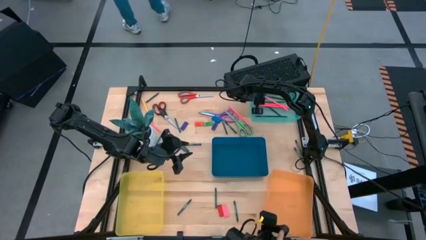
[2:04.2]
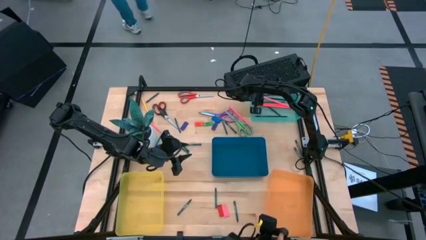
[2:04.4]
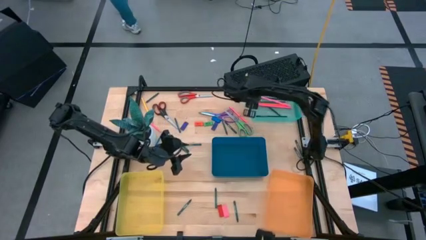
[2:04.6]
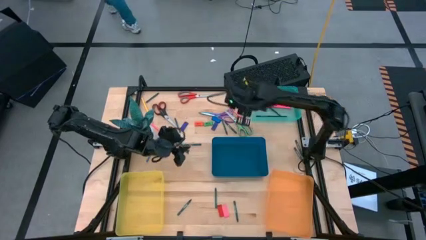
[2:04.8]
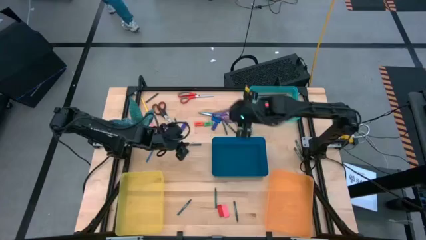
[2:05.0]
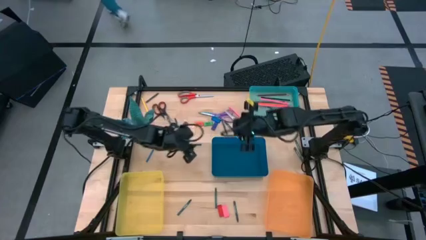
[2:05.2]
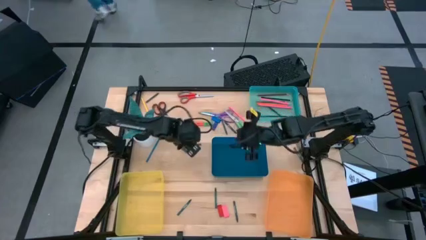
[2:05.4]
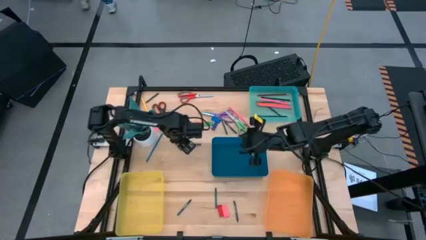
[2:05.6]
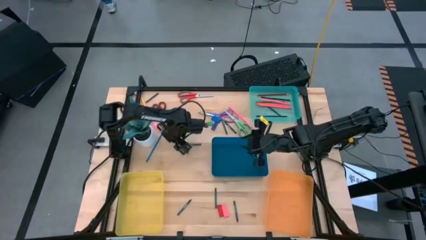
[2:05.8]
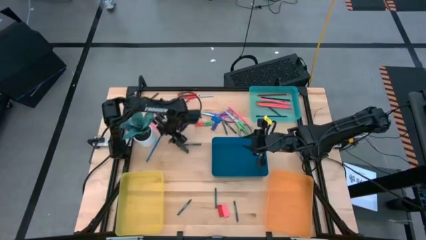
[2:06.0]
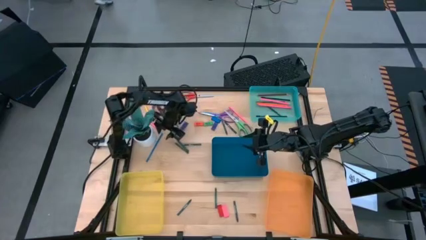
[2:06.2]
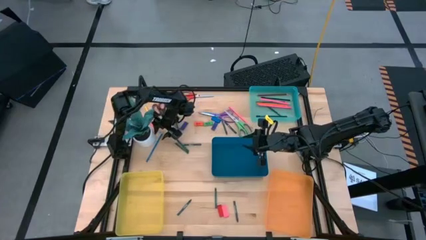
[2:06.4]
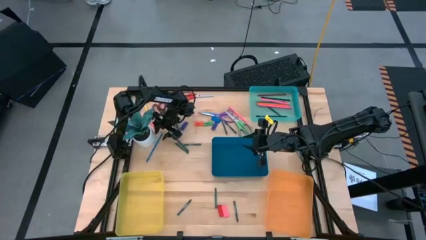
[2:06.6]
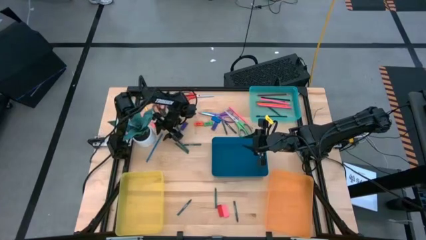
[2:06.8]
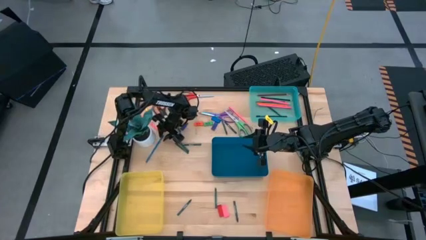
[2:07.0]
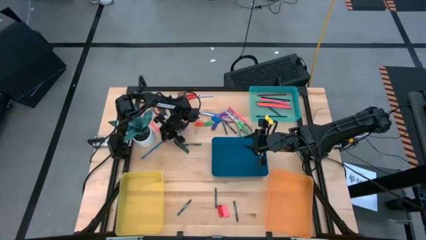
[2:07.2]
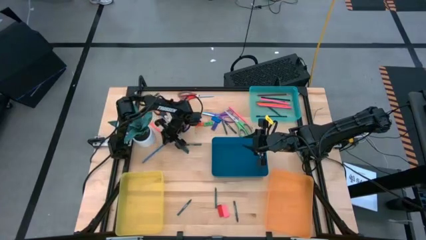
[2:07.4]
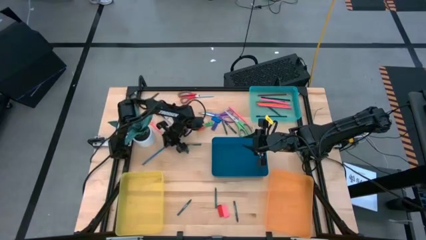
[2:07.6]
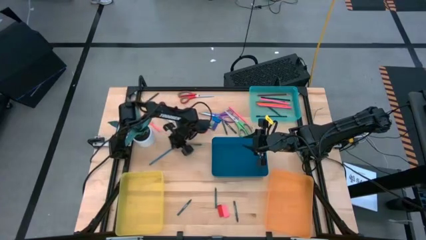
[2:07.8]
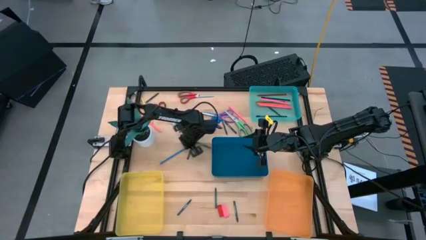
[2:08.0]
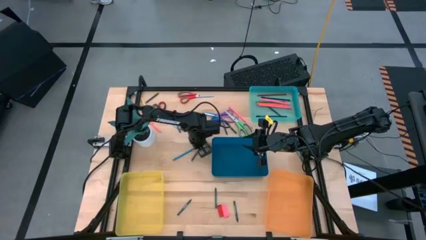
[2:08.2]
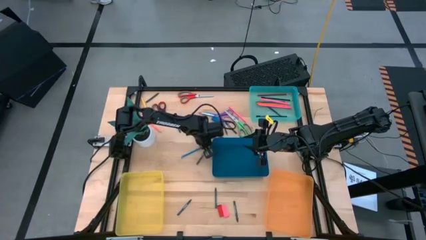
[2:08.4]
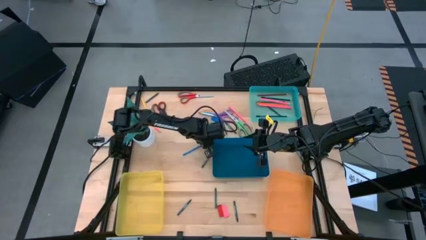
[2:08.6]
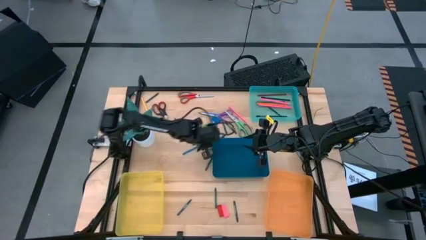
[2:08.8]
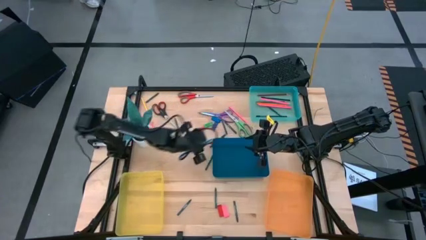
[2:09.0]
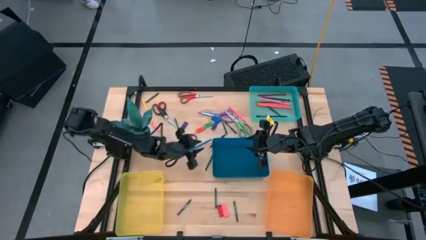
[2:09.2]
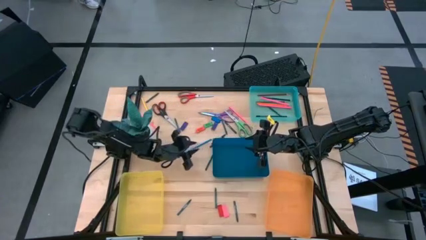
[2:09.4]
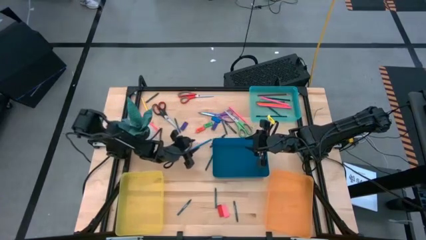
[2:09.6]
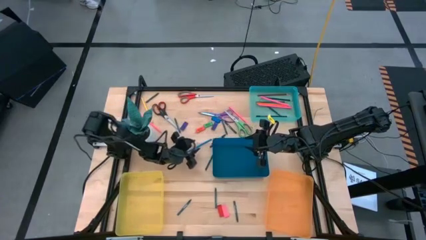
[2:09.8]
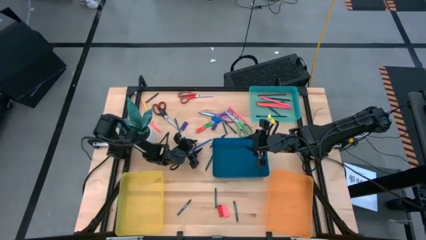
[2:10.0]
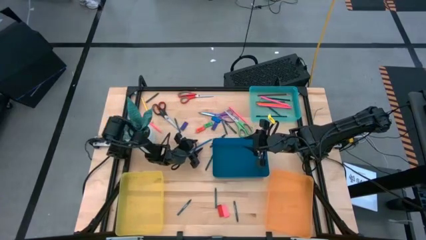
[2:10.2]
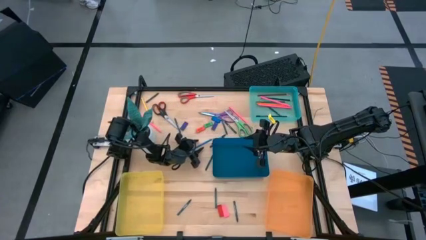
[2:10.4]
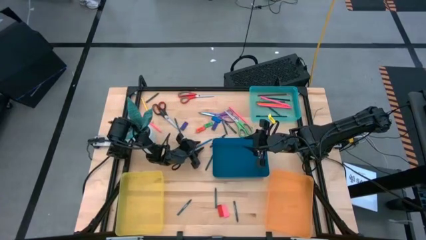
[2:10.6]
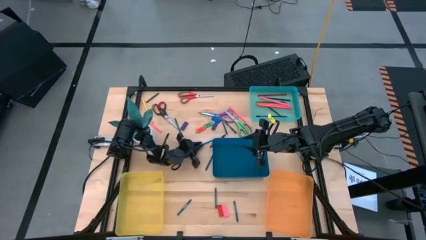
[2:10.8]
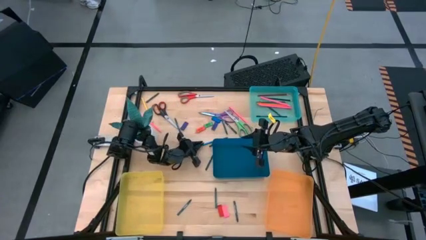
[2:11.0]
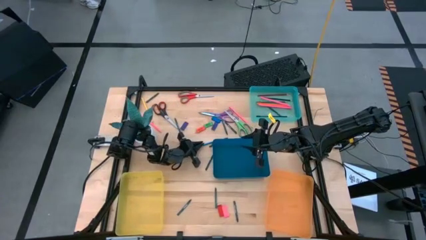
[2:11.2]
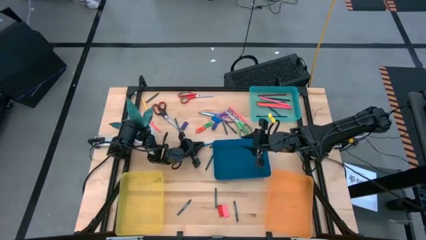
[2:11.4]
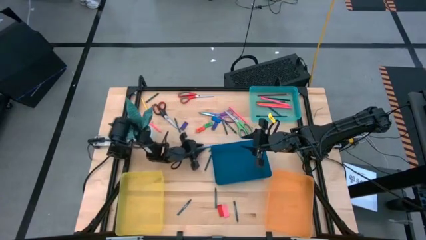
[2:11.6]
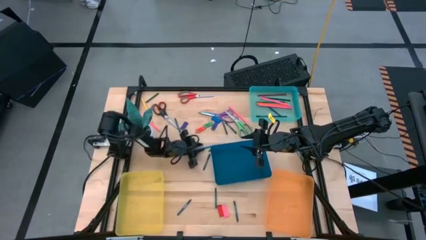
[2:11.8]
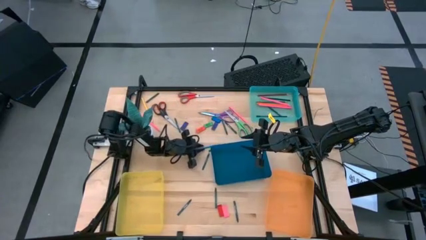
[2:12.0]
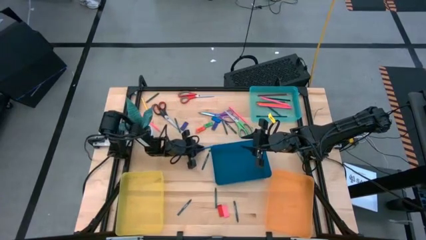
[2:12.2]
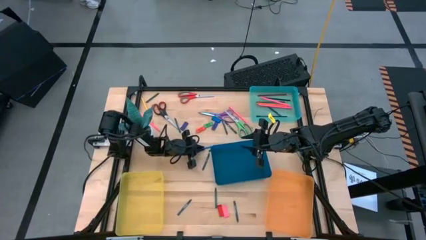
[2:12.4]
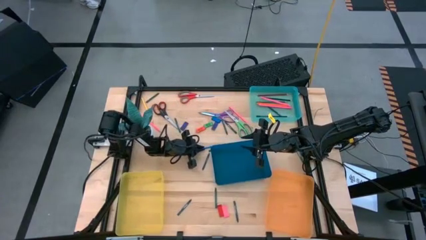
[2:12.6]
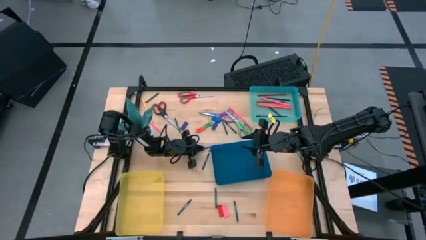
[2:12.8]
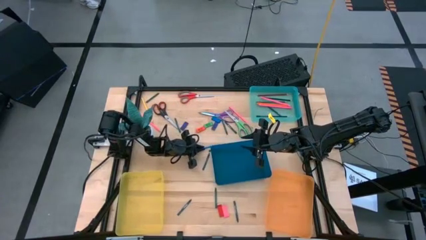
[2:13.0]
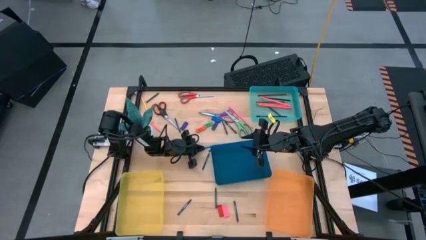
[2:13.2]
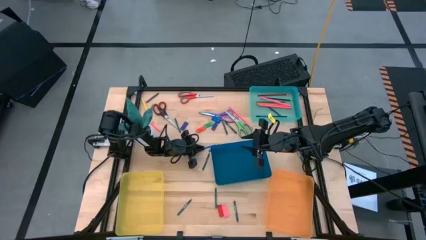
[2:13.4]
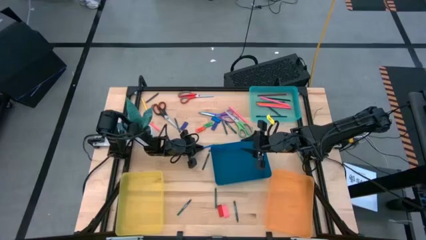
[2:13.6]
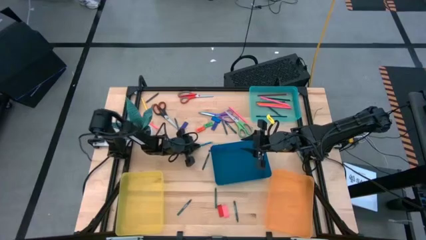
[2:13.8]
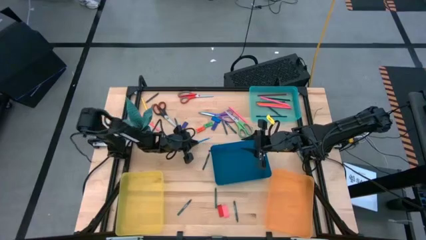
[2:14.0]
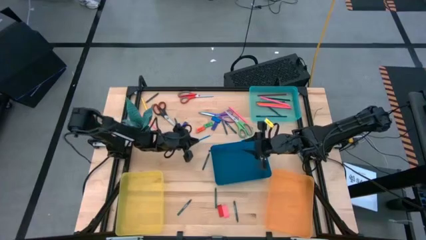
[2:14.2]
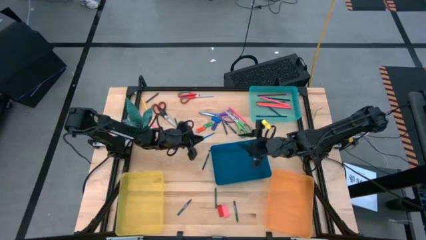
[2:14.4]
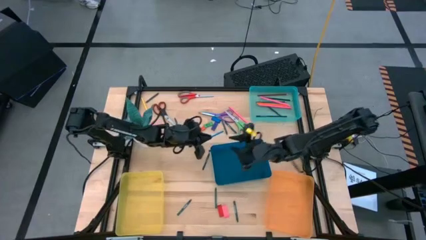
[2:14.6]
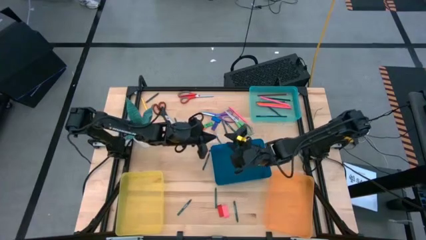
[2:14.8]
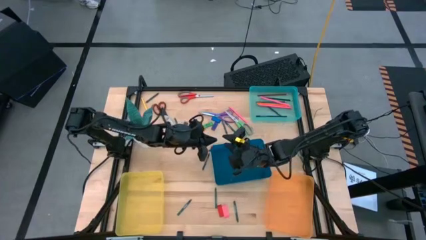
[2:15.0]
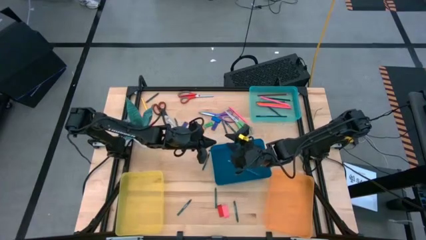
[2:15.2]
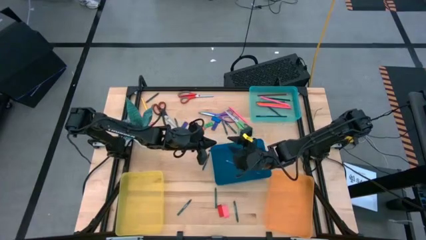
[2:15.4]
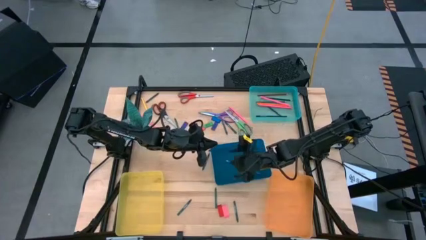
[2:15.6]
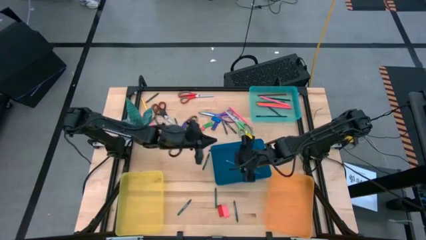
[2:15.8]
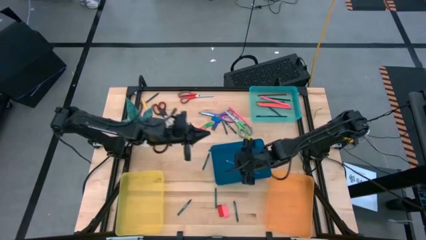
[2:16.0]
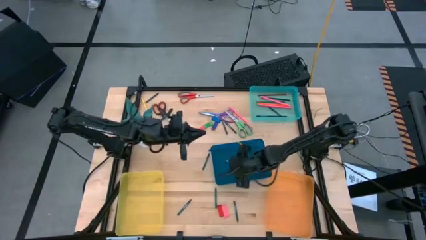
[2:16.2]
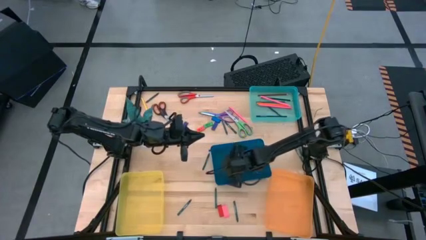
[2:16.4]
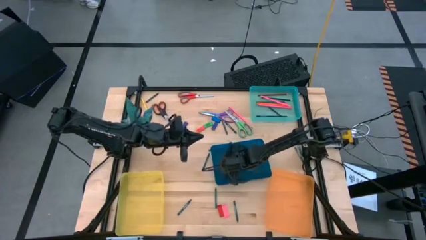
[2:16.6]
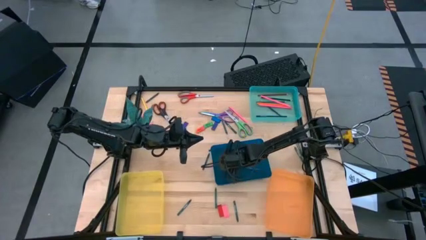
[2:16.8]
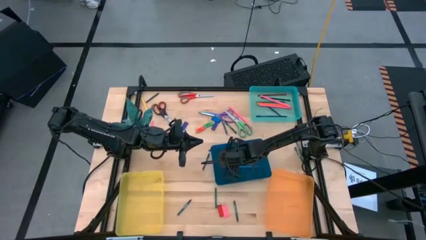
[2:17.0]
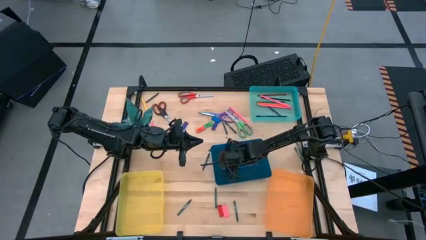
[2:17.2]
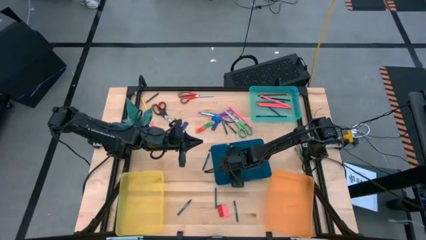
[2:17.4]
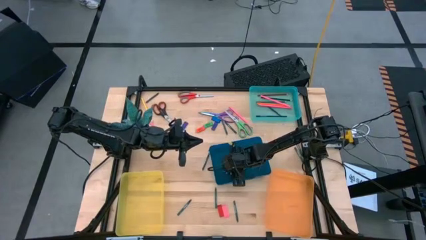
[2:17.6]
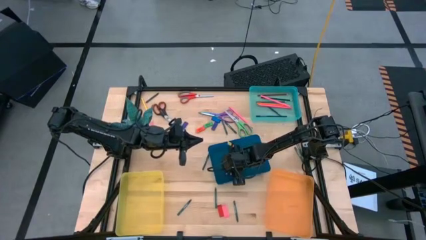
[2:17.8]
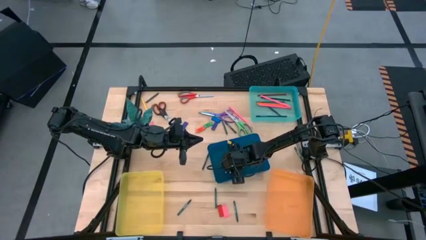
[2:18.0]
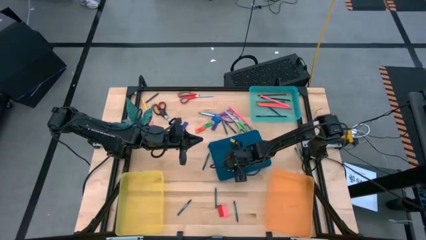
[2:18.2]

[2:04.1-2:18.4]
Task: Sort crayons/erasers/pens/pencils in bins
Put the blue pencil into the blue bin

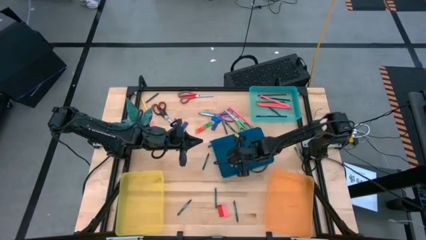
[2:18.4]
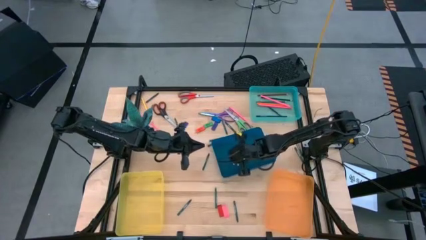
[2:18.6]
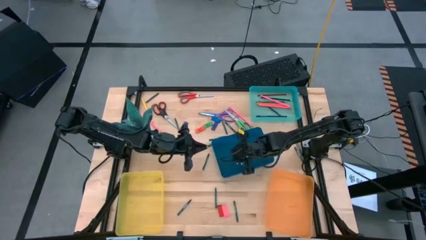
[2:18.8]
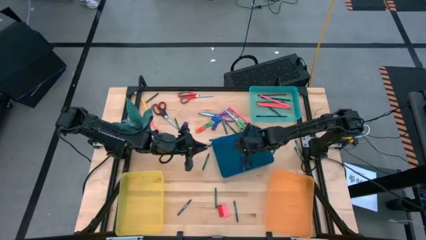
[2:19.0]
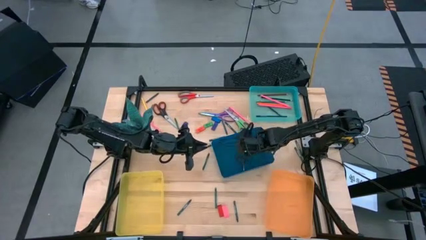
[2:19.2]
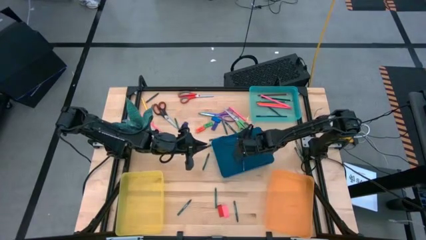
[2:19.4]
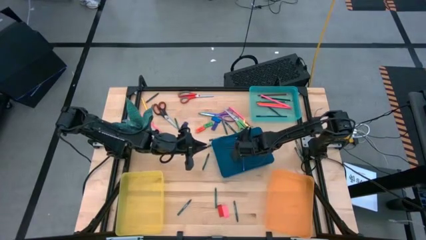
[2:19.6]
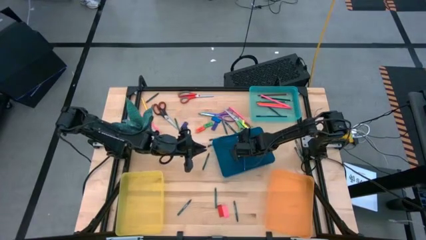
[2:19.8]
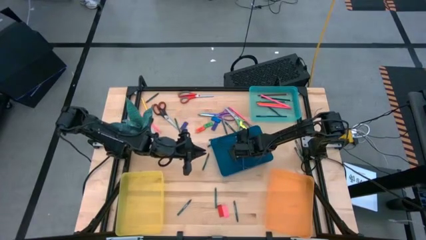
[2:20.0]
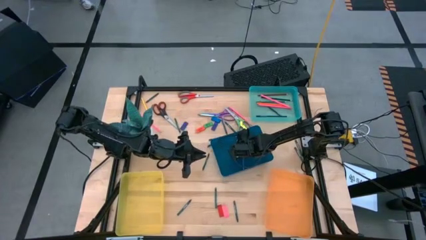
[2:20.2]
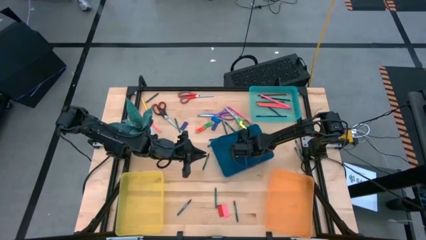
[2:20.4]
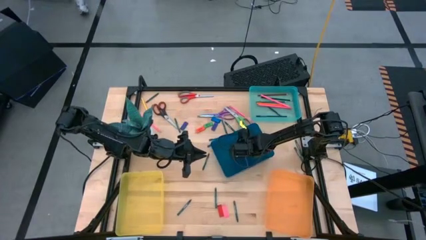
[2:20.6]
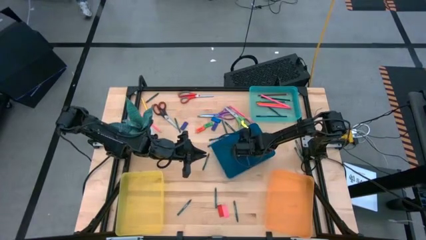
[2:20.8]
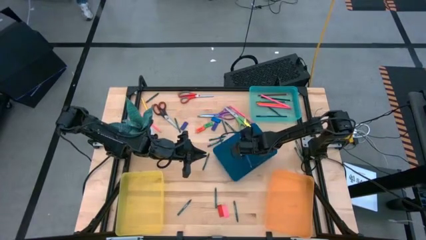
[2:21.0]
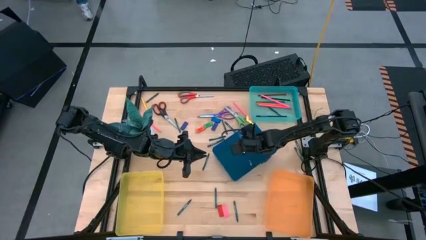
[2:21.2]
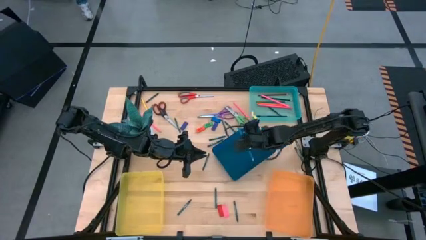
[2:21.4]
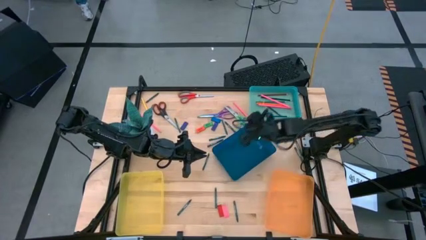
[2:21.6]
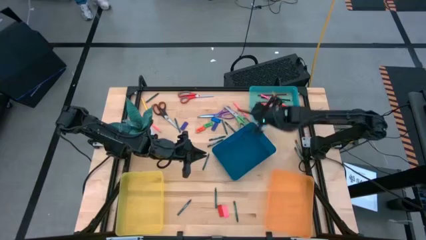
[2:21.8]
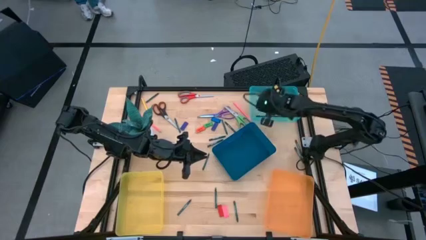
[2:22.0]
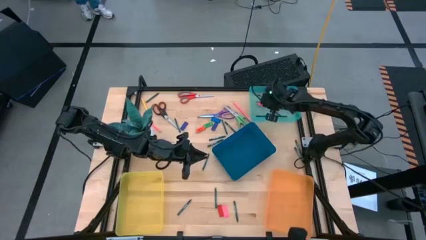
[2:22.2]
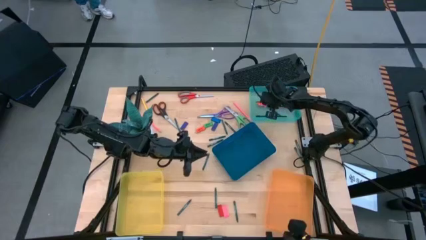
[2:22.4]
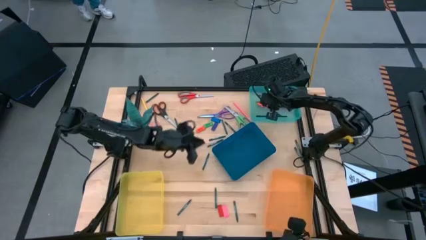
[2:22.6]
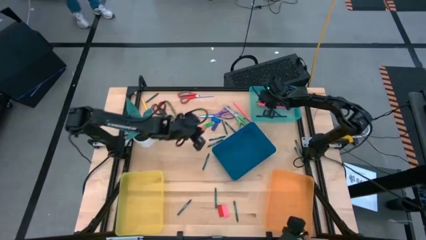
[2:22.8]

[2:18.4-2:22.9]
Put the blue pencil into the green bin
